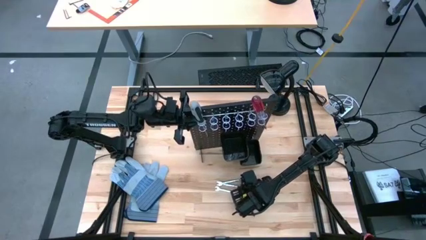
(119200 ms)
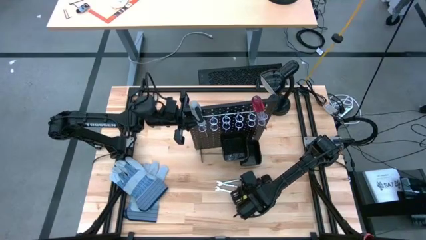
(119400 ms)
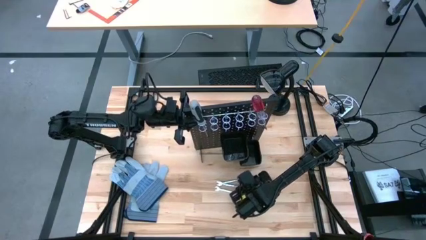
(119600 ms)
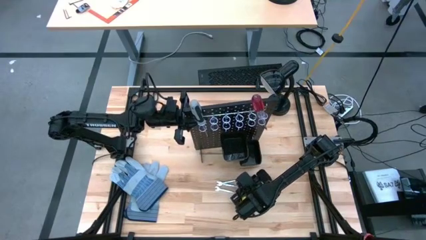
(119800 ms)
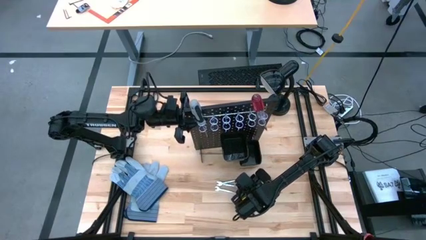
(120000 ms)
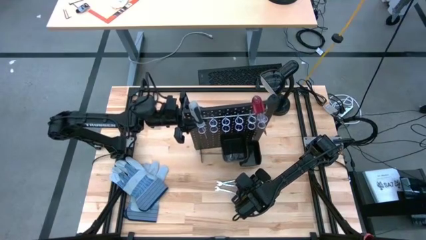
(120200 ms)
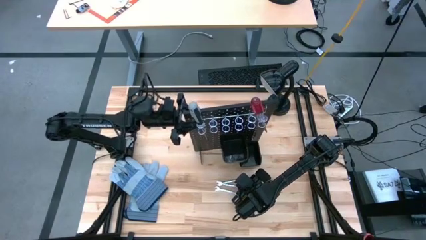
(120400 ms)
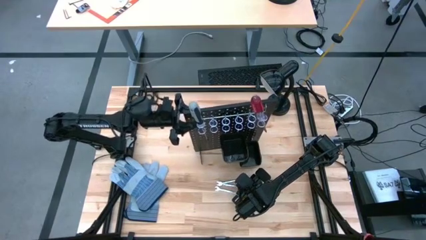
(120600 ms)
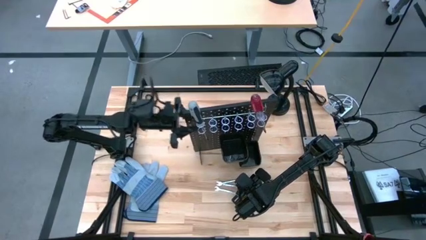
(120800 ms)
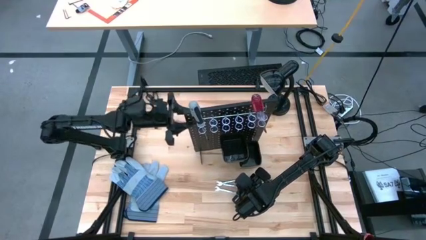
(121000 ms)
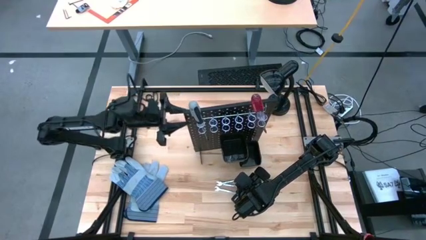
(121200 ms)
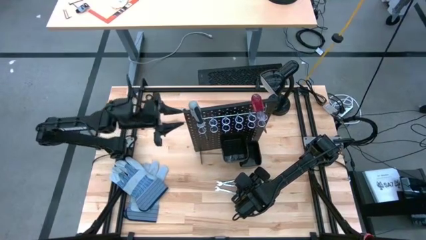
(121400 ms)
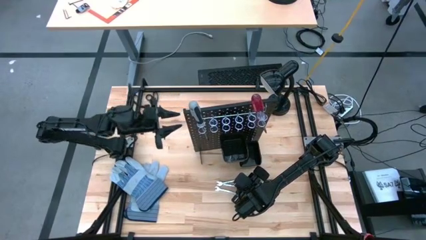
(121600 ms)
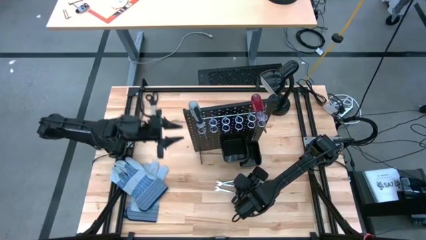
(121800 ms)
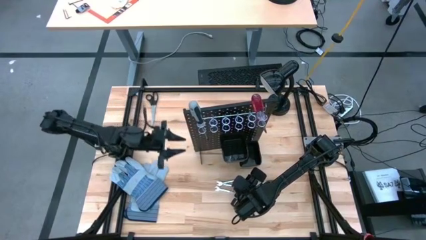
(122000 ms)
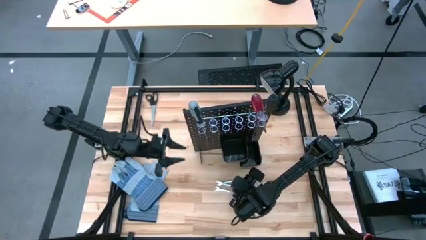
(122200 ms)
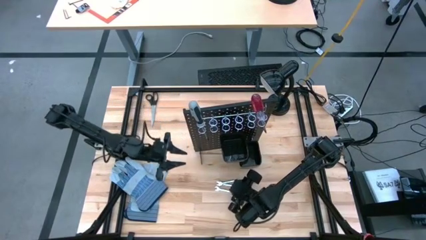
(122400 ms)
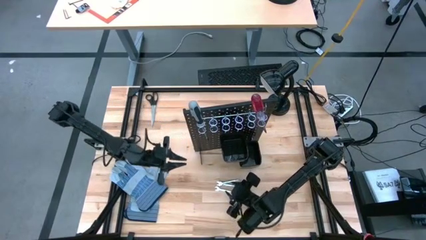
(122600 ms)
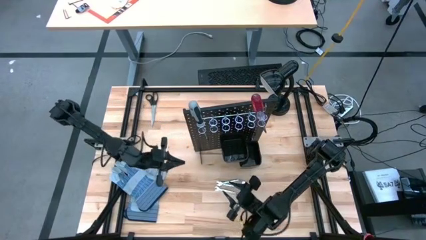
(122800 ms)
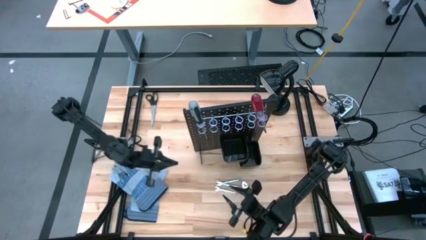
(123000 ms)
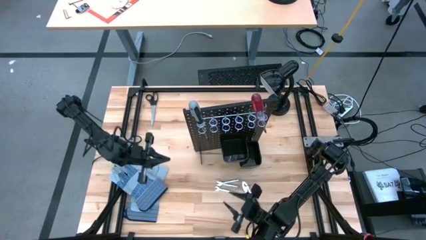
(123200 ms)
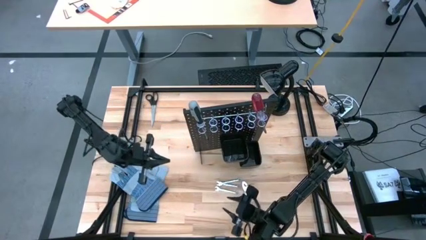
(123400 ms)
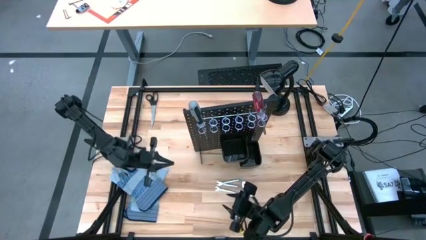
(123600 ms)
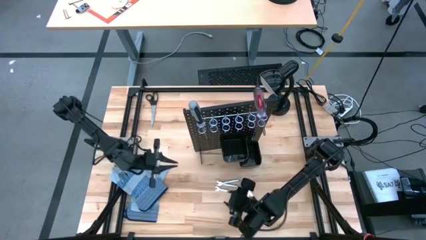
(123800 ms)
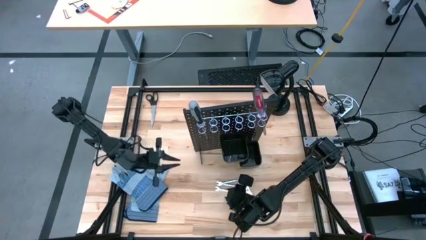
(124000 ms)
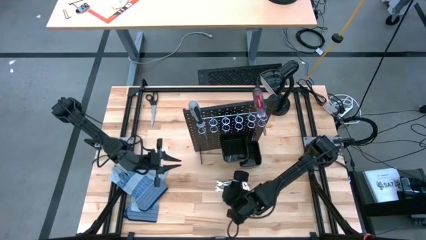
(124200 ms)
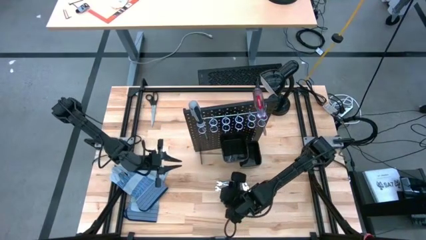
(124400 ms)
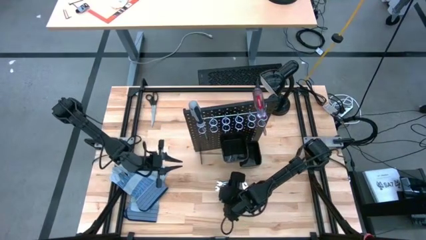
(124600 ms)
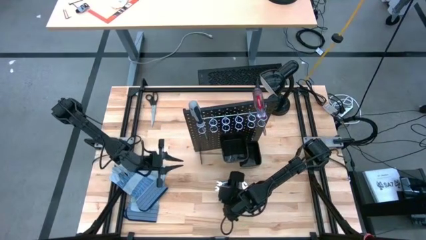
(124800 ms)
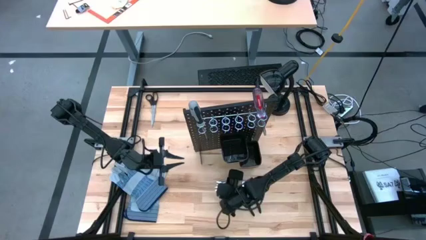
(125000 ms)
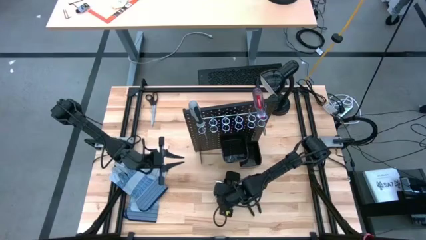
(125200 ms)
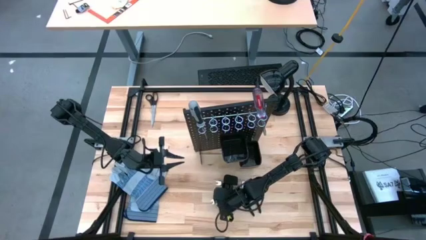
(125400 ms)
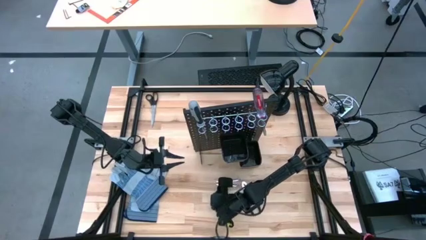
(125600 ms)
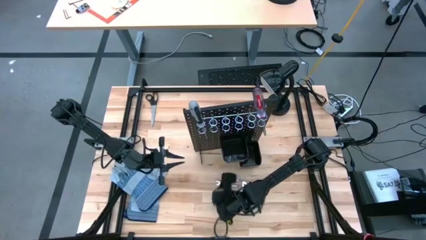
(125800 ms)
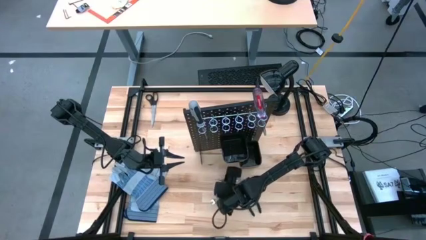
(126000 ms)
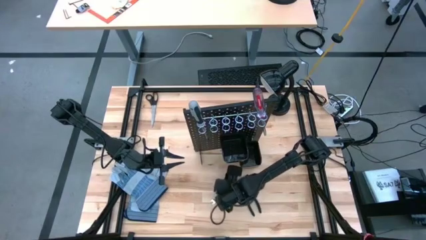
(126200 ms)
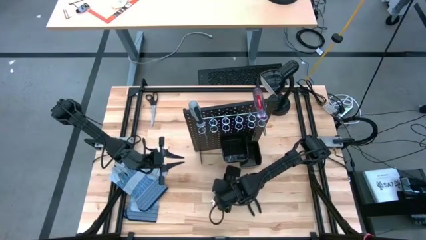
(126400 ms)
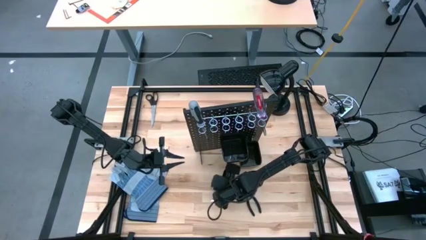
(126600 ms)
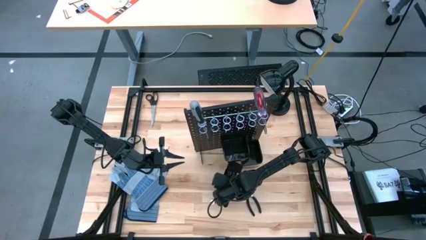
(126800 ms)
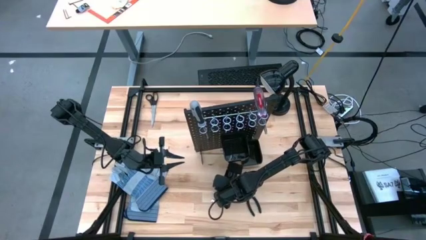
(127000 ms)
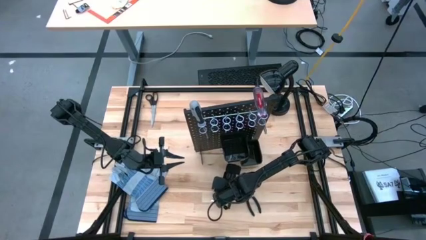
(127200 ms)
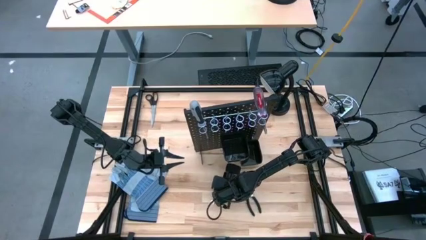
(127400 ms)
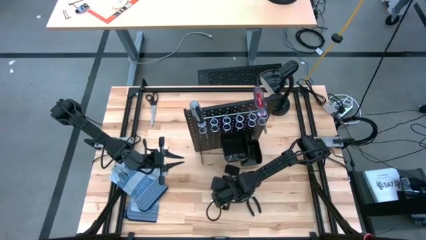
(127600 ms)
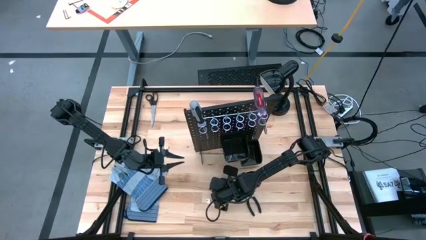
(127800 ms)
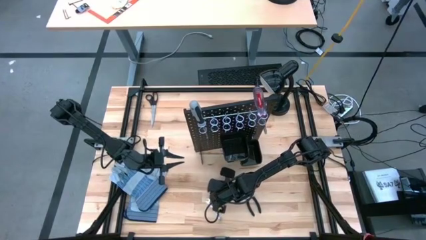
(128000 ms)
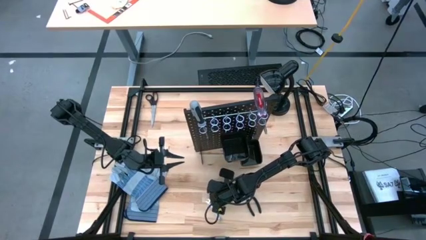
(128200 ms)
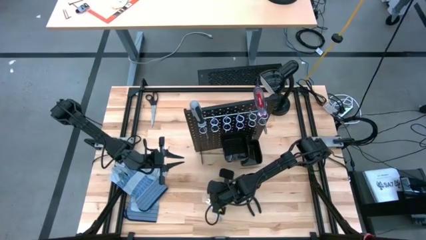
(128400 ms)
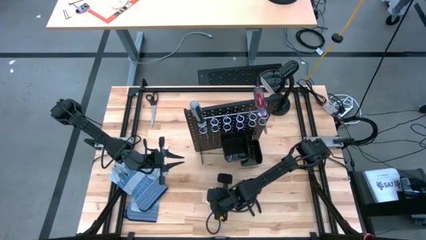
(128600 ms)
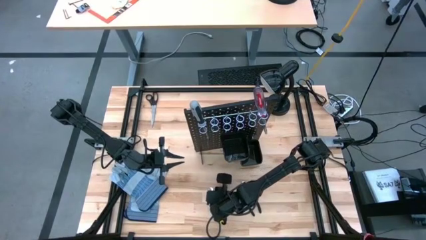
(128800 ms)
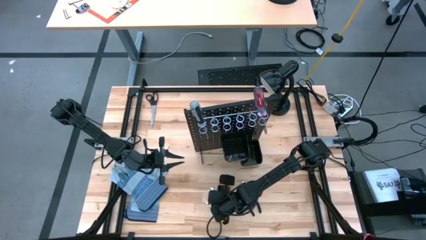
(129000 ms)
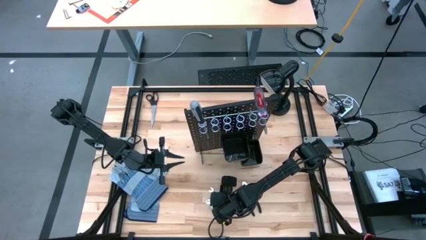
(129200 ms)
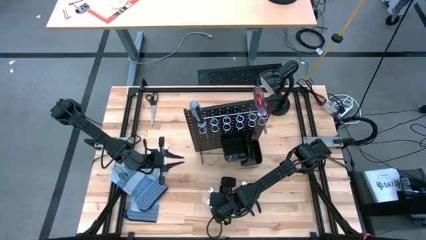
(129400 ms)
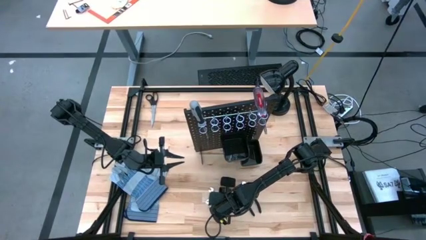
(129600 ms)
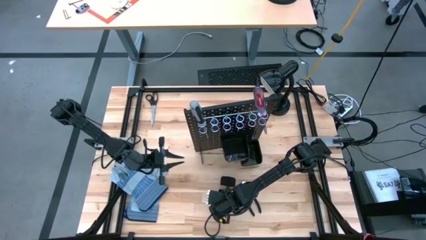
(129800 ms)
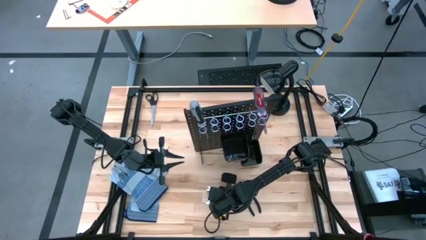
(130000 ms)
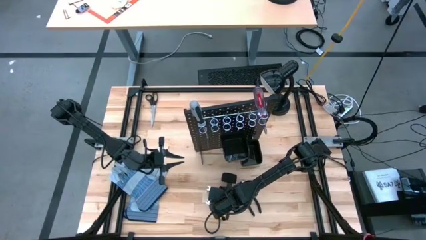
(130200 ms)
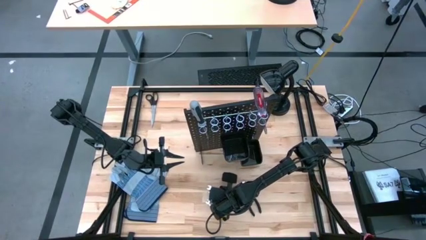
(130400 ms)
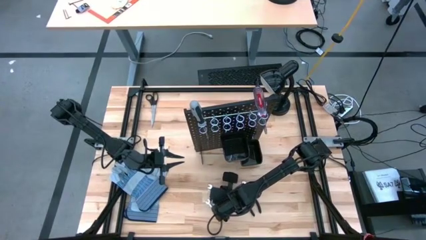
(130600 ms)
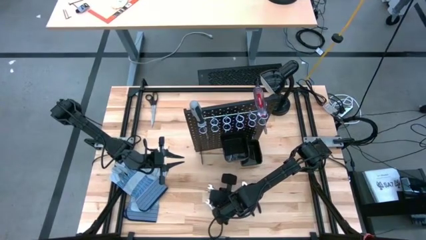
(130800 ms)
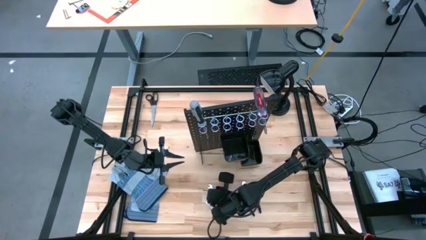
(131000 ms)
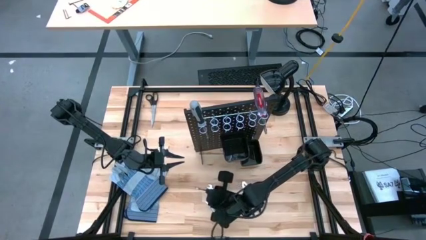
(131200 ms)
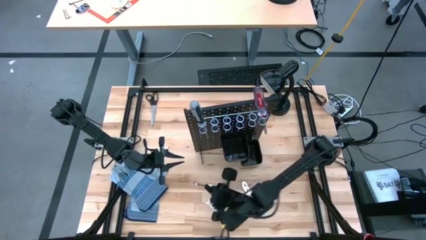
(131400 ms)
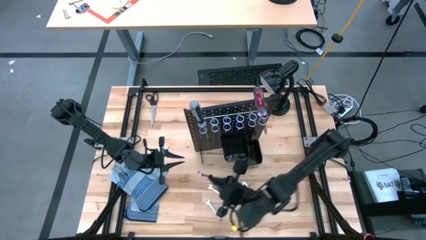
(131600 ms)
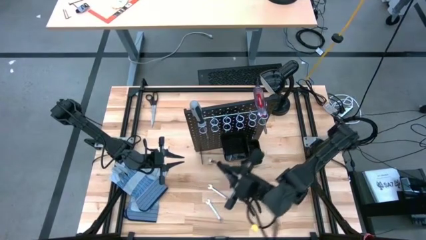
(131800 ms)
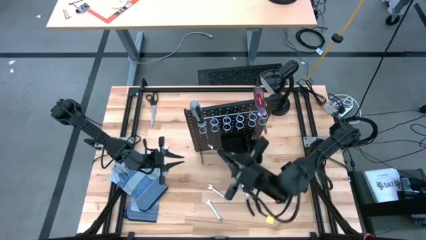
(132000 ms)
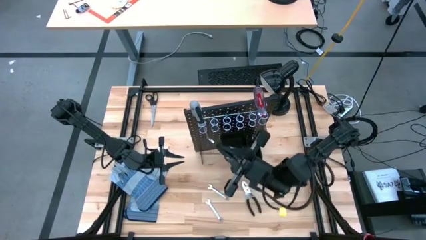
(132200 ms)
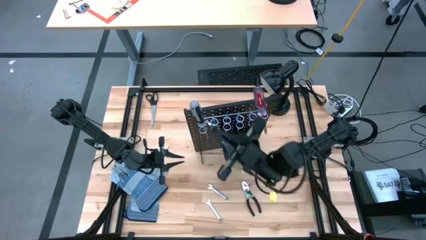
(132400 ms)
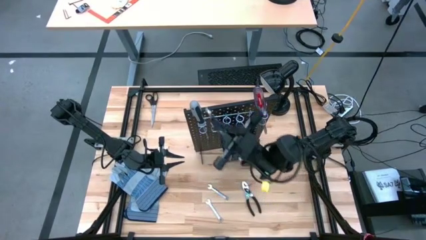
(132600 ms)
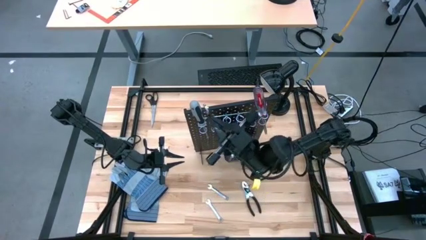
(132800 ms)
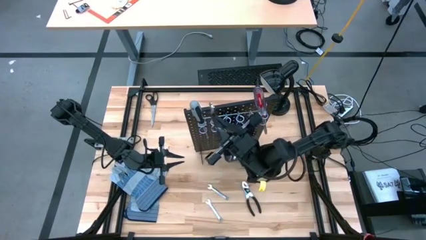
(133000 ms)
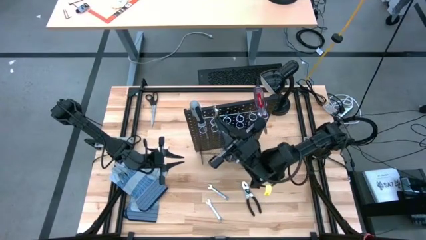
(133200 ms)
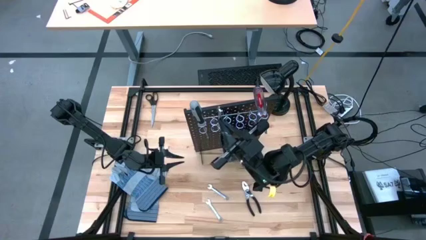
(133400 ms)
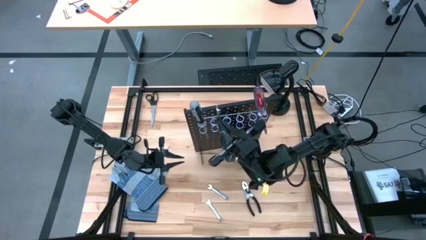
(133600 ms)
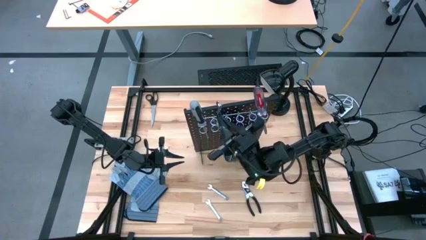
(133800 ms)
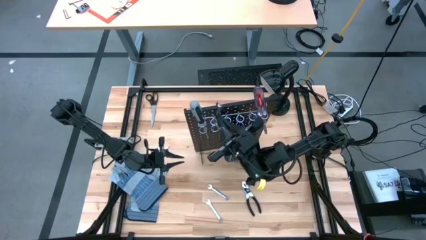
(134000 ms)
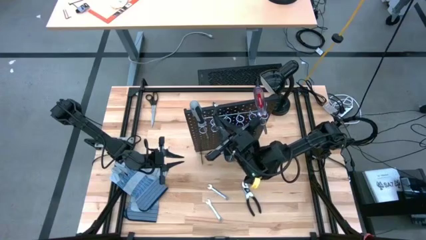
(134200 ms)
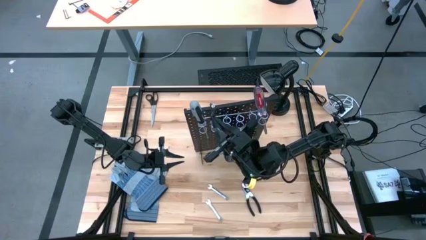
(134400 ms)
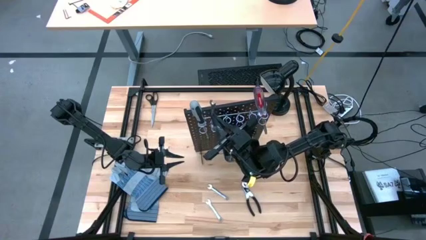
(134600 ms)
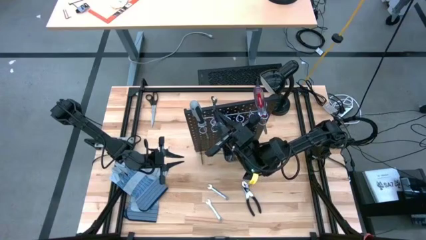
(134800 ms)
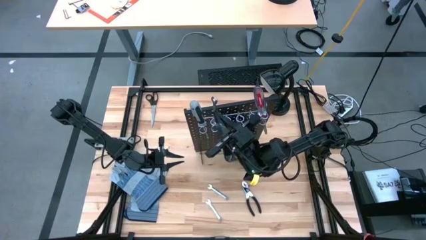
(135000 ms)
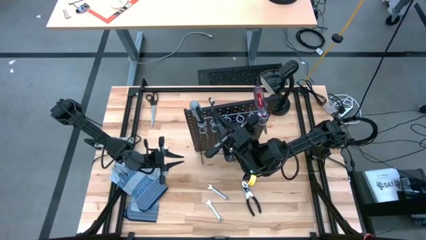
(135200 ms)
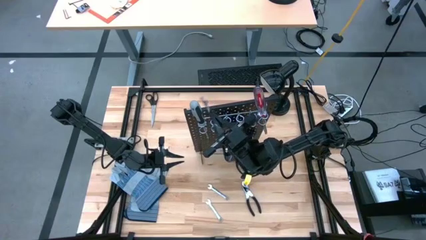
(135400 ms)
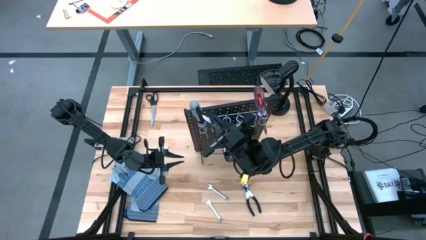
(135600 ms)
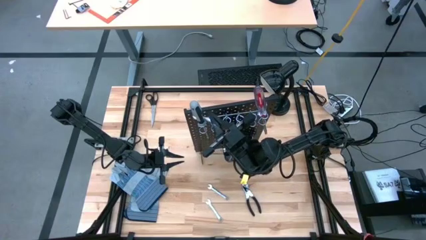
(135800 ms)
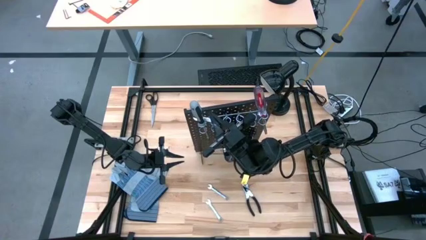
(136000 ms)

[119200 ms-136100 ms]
Task: Hang tools onto peg board
Hang the silver wrench on the black peg board
